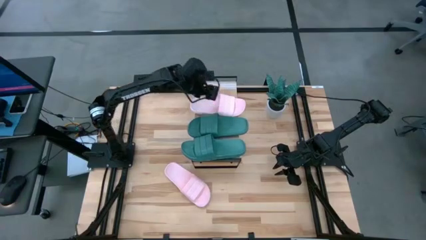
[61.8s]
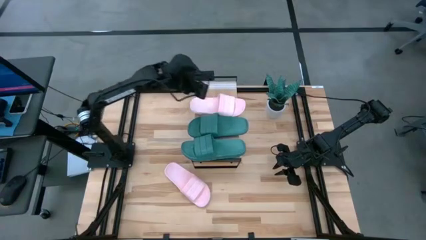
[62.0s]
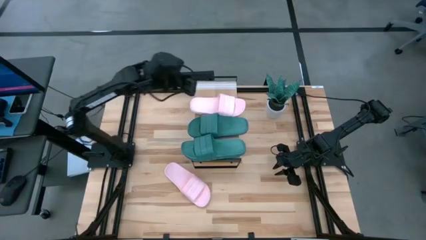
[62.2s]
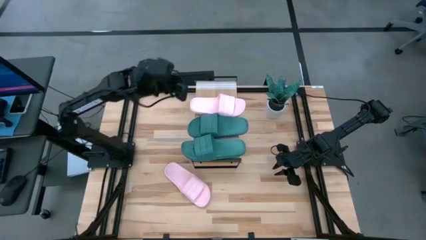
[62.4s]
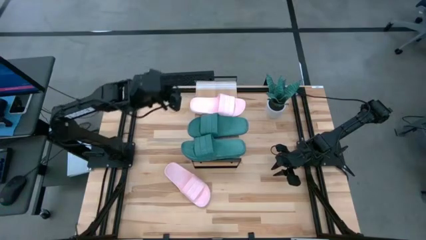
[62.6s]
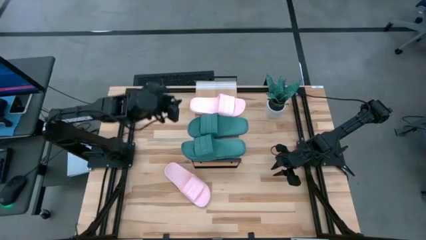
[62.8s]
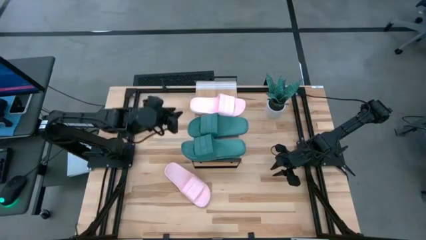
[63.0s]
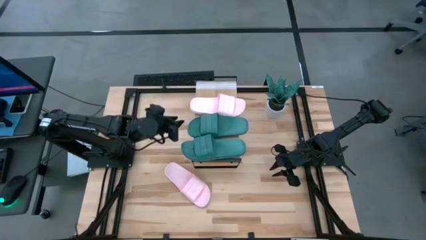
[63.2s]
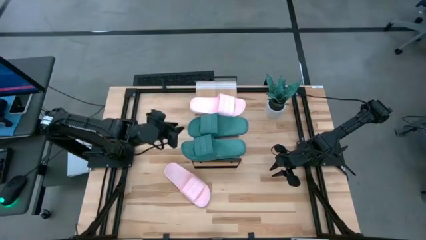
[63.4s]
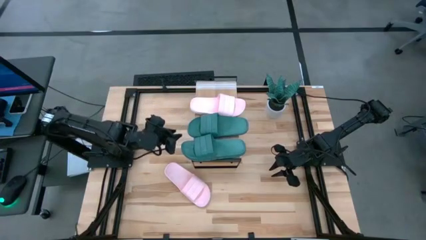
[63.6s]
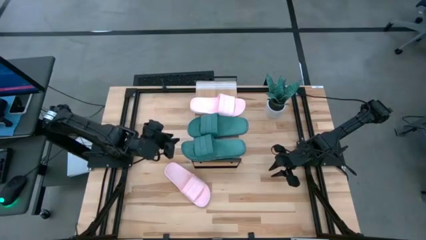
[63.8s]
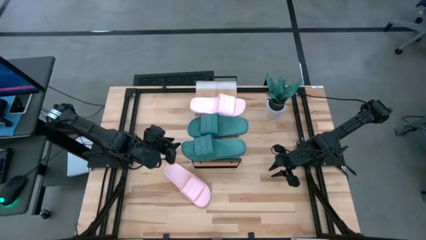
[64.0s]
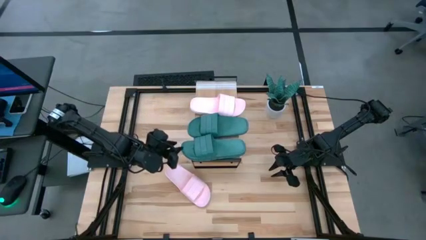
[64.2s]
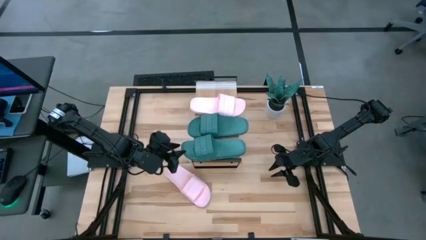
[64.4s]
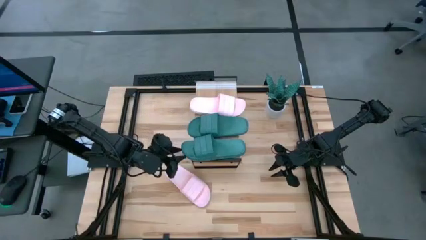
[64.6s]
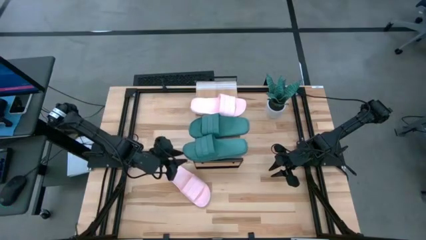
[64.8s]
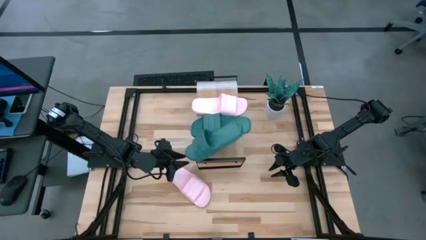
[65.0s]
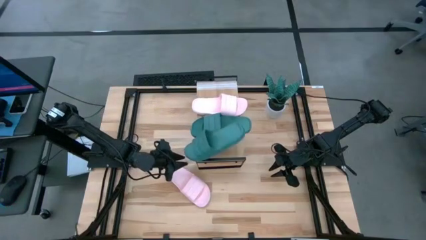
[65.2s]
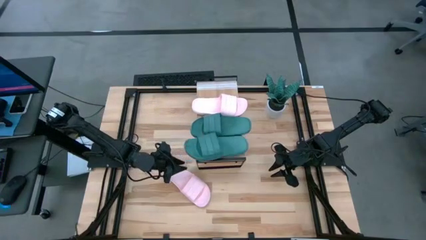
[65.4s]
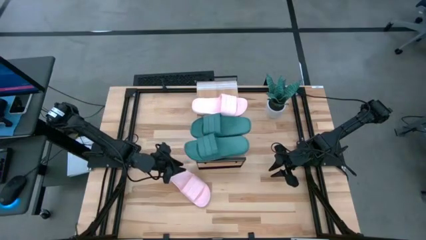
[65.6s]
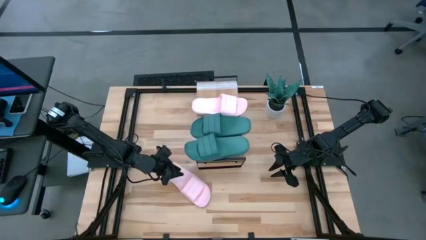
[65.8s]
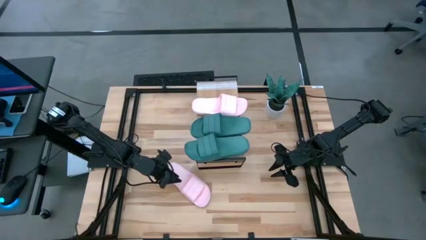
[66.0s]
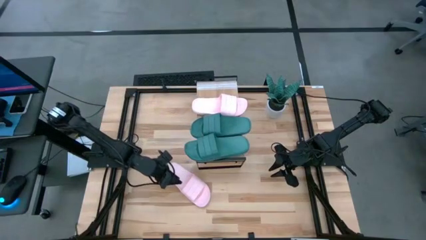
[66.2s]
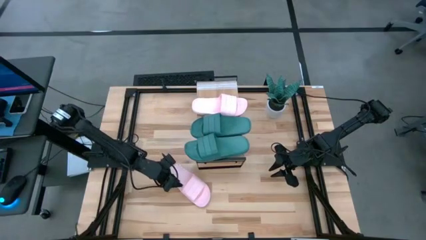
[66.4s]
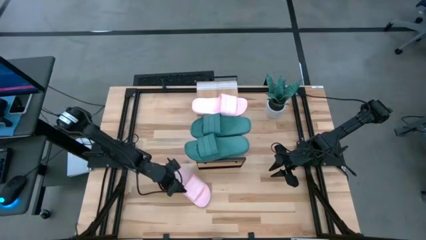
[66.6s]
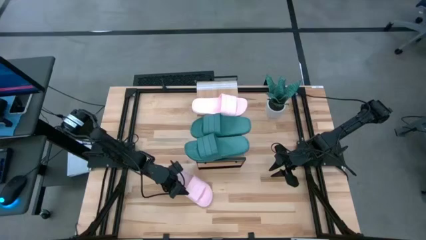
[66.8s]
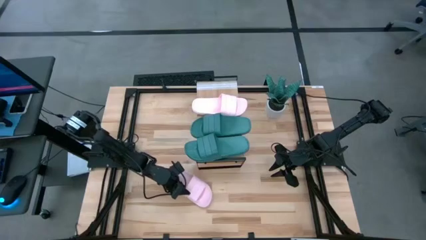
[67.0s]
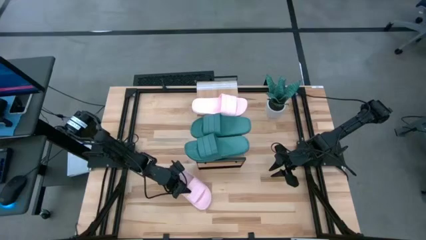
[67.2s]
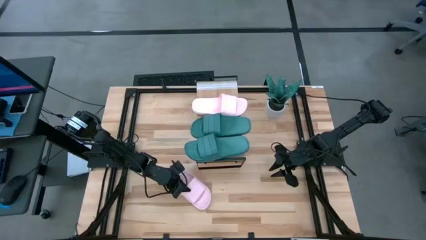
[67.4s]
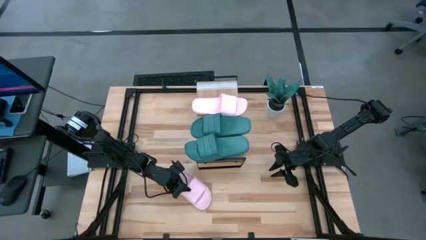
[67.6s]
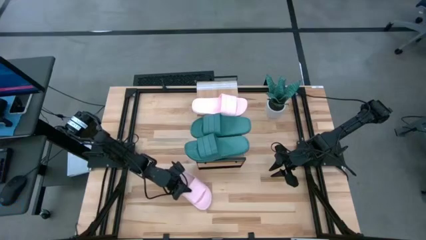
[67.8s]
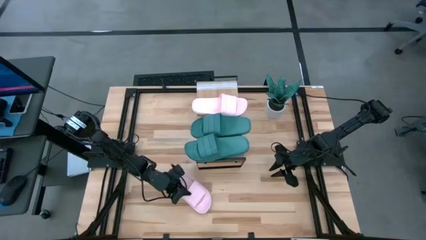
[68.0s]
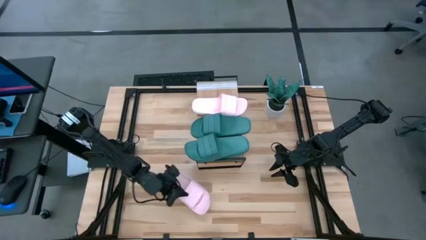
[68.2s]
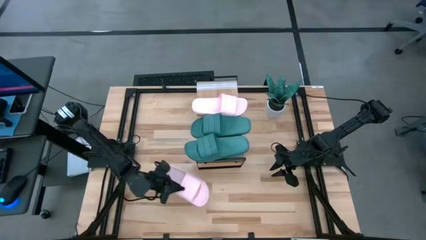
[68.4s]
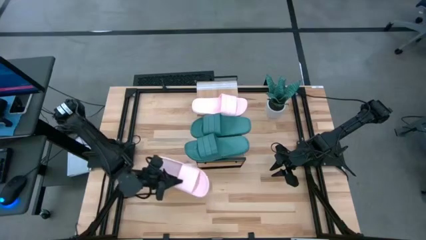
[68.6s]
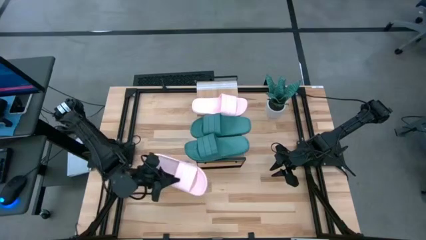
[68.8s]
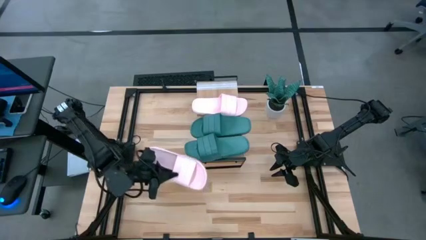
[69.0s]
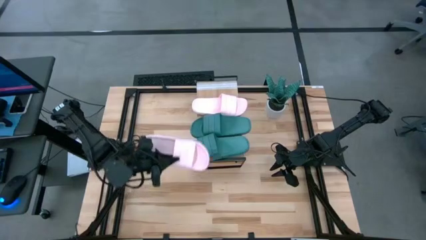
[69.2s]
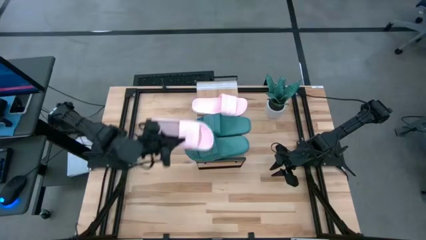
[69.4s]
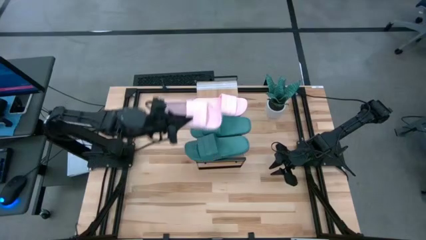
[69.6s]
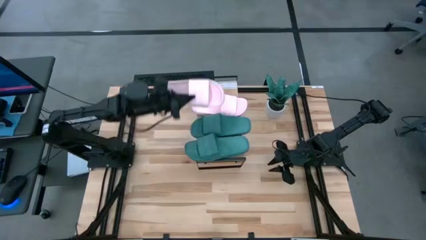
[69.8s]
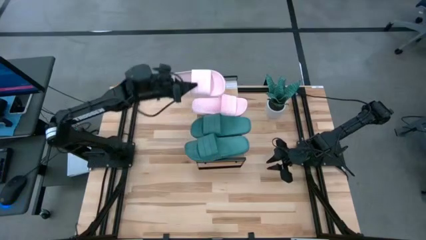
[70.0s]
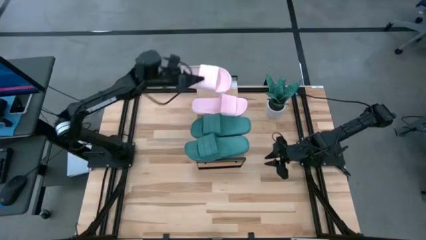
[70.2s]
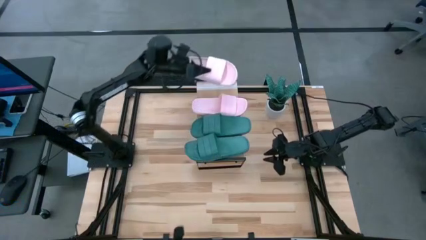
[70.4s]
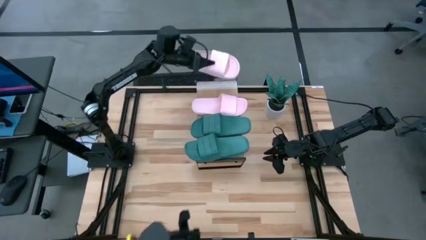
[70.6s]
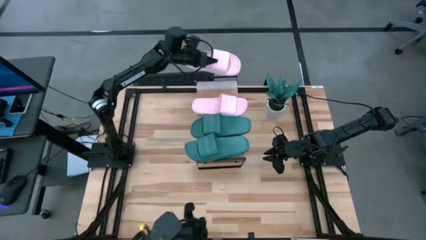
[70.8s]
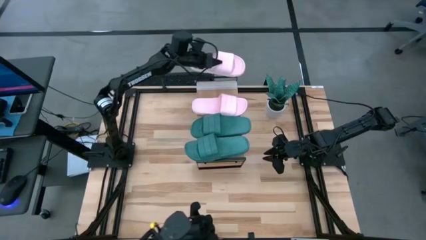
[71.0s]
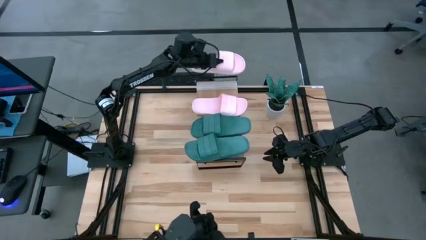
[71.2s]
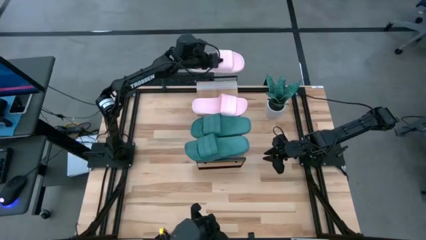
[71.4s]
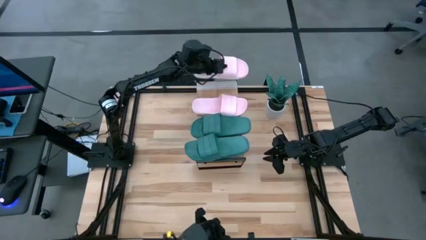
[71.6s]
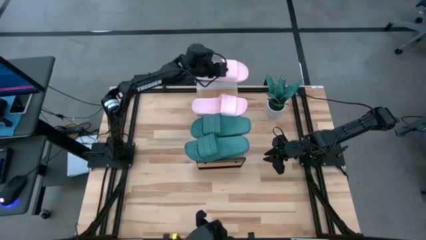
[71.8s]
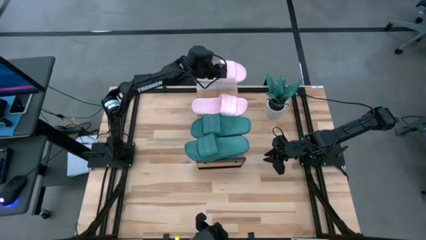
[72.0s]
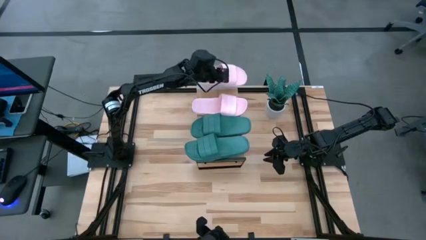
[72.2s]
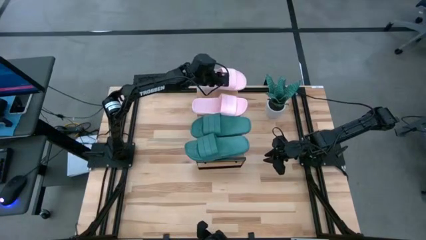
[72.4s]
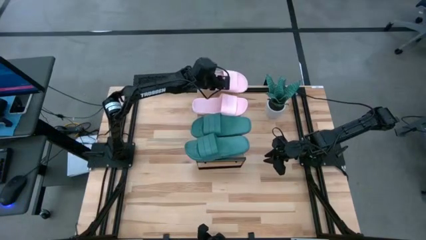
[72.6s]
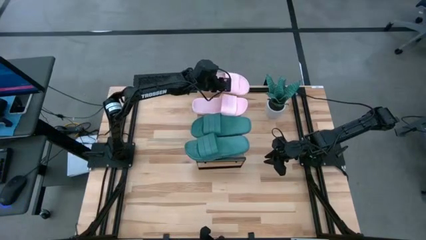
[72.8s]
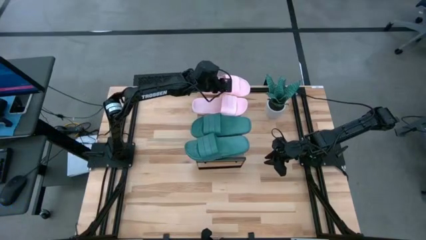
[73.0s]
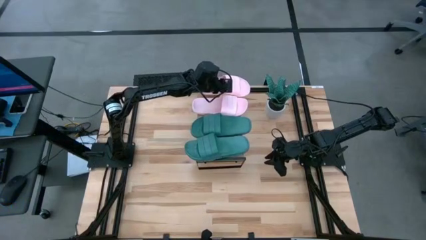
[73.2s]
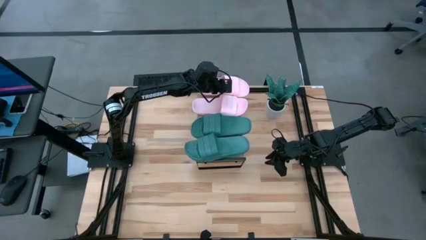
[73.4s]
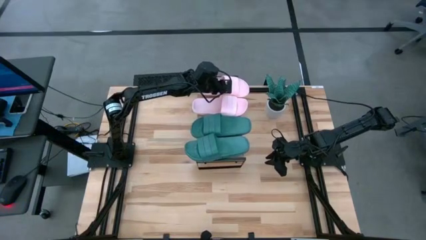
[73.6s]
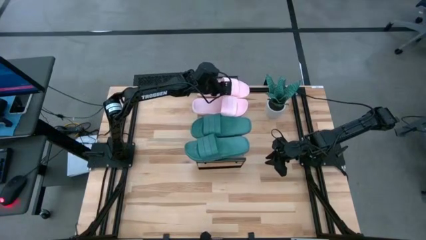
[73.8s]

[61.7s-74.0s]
Task: Pick and place slides into the shelf
Put the pink slide on the shelf
